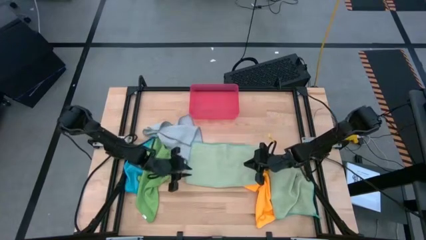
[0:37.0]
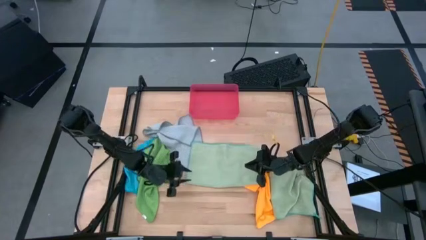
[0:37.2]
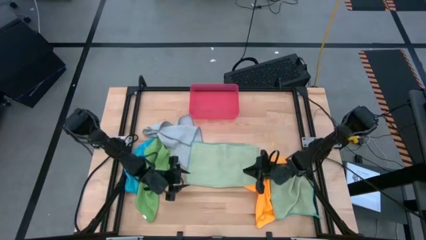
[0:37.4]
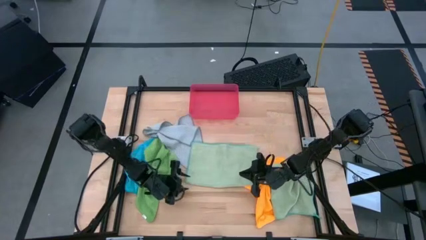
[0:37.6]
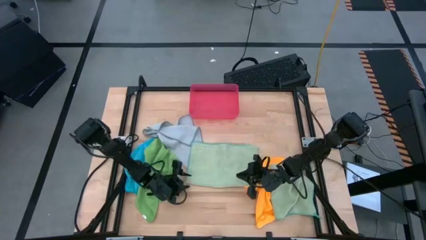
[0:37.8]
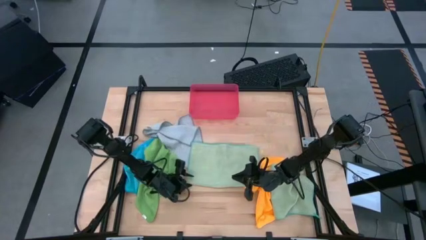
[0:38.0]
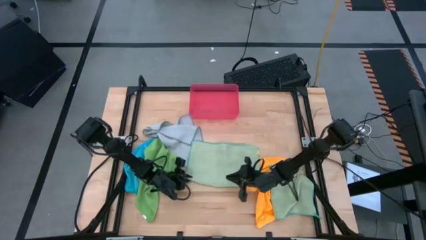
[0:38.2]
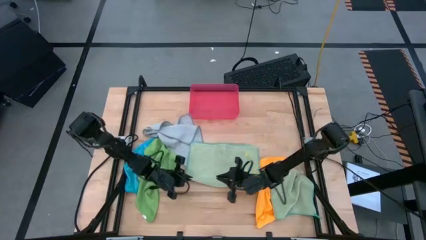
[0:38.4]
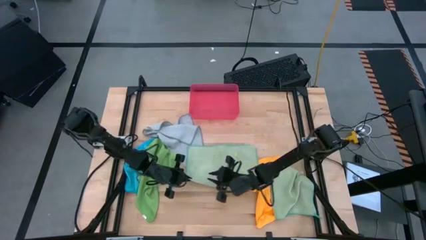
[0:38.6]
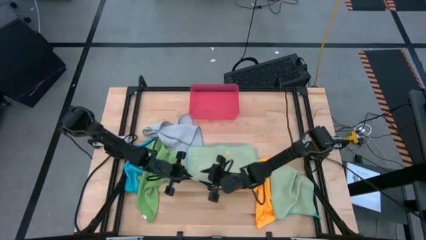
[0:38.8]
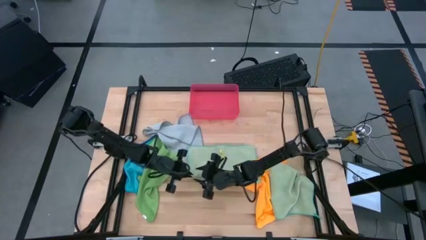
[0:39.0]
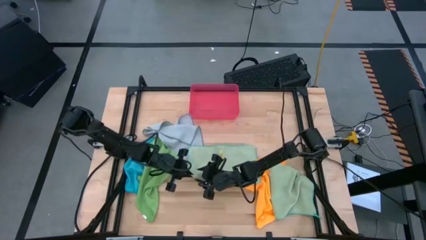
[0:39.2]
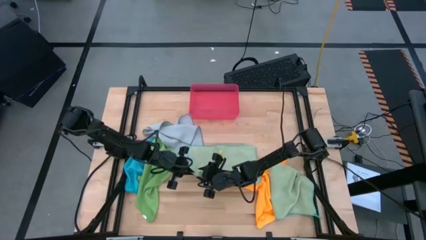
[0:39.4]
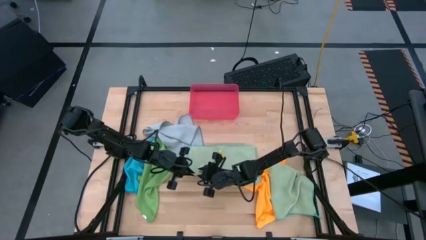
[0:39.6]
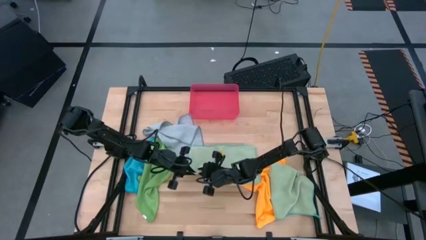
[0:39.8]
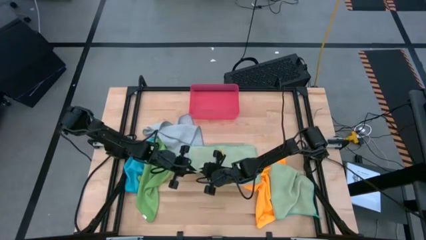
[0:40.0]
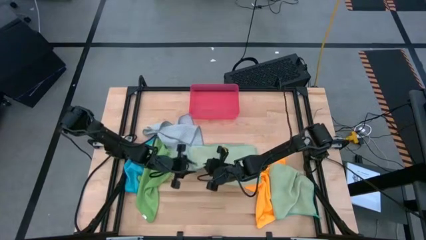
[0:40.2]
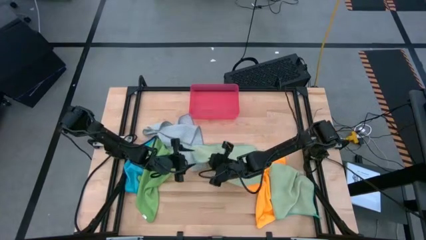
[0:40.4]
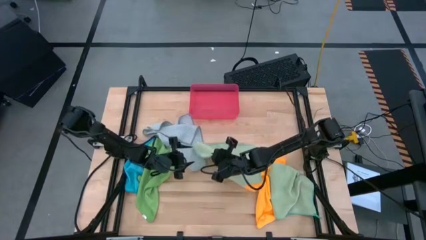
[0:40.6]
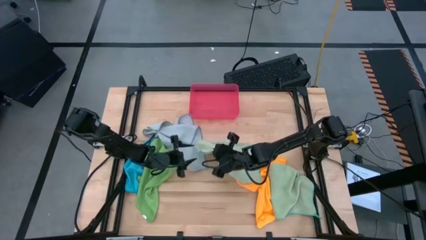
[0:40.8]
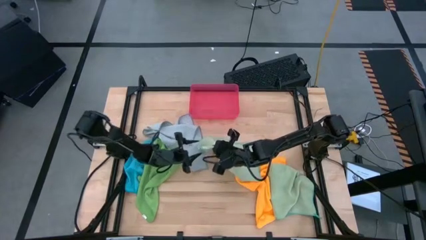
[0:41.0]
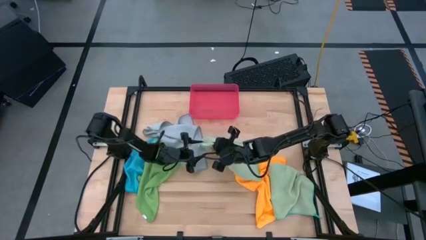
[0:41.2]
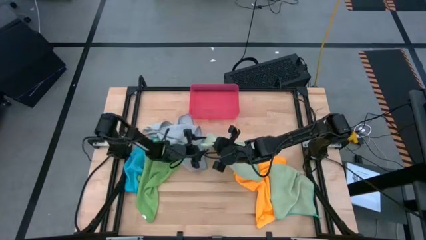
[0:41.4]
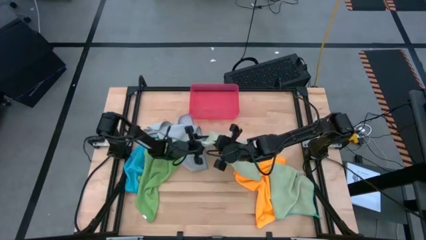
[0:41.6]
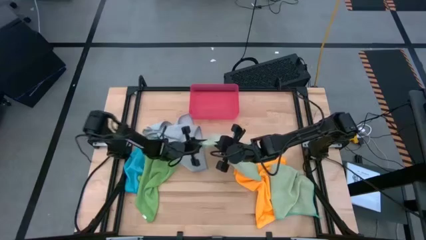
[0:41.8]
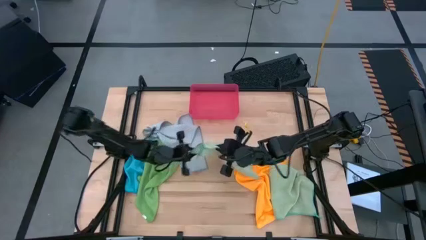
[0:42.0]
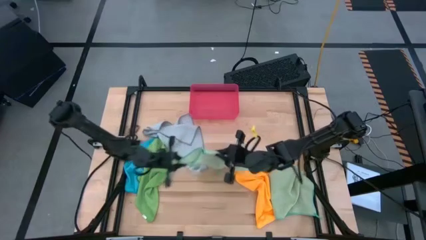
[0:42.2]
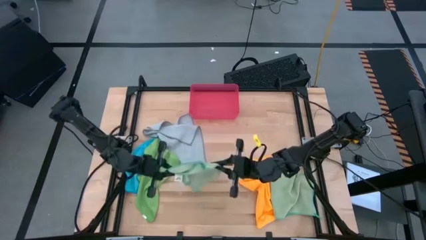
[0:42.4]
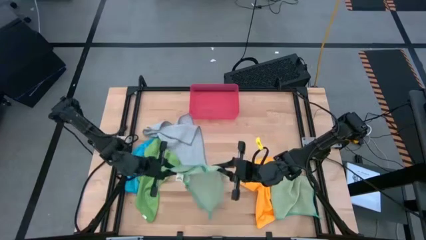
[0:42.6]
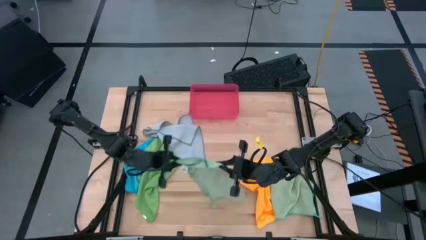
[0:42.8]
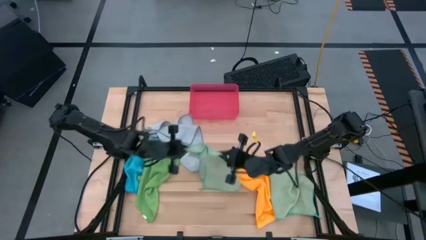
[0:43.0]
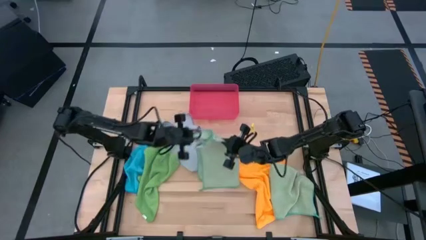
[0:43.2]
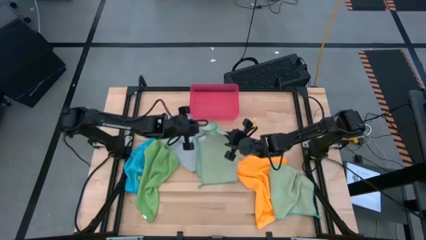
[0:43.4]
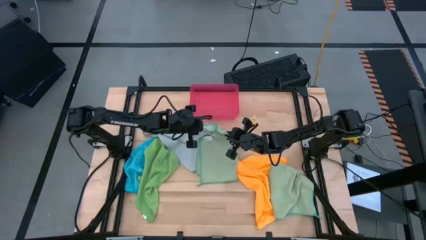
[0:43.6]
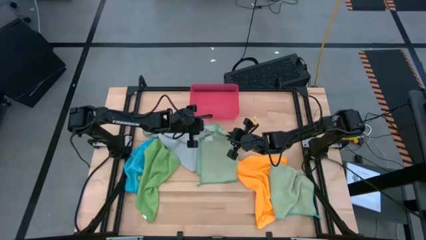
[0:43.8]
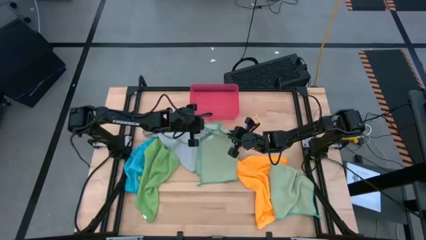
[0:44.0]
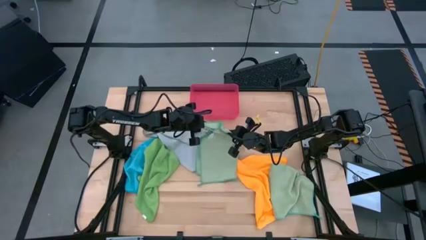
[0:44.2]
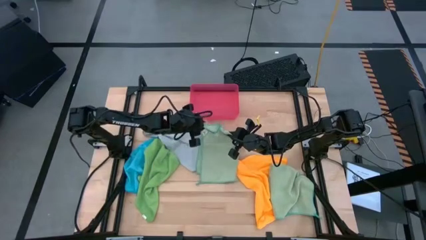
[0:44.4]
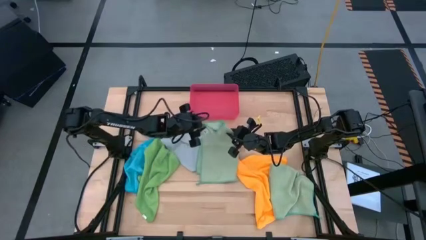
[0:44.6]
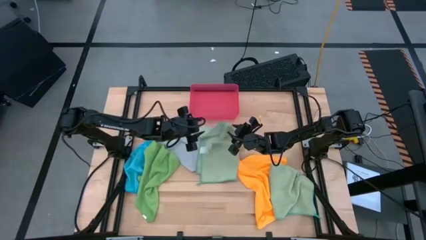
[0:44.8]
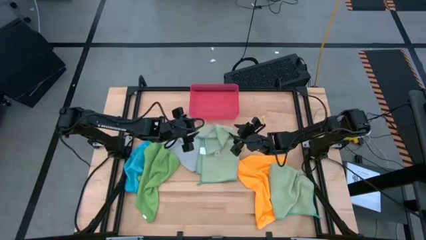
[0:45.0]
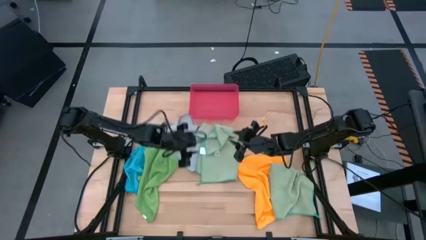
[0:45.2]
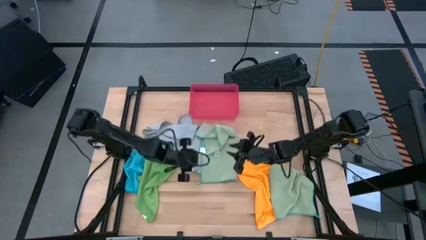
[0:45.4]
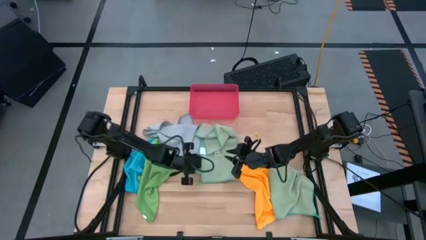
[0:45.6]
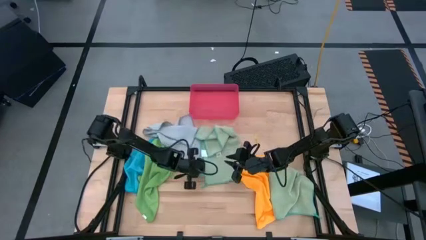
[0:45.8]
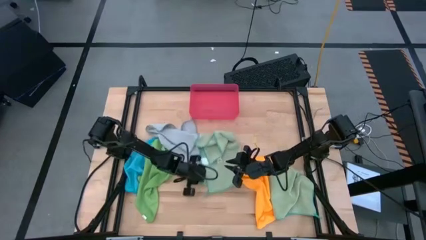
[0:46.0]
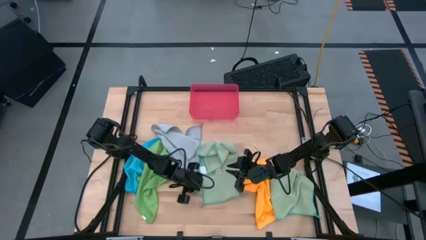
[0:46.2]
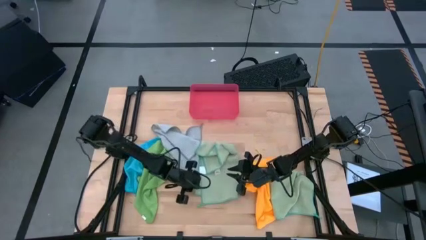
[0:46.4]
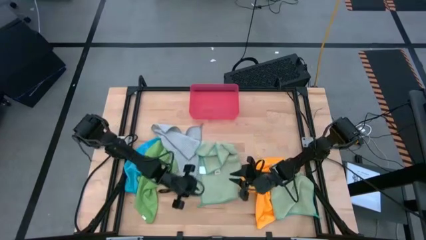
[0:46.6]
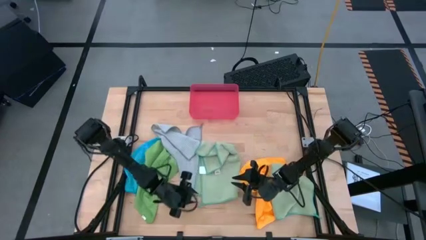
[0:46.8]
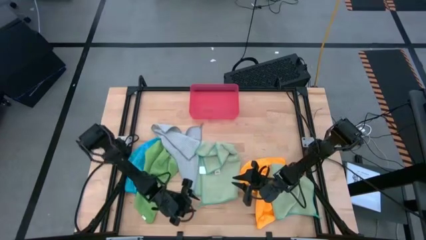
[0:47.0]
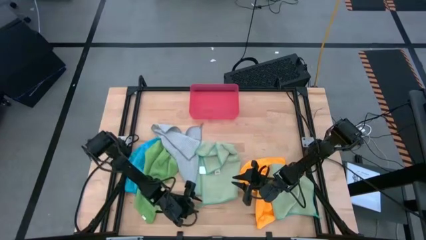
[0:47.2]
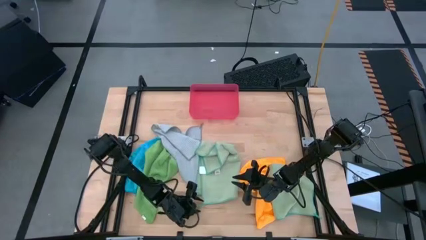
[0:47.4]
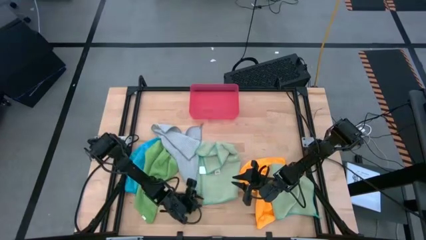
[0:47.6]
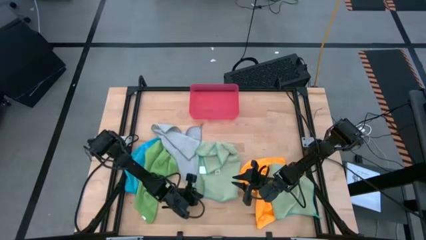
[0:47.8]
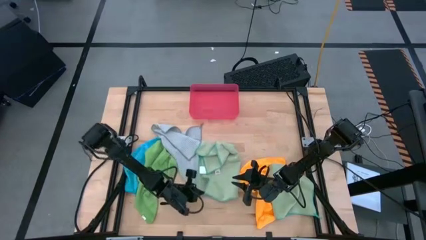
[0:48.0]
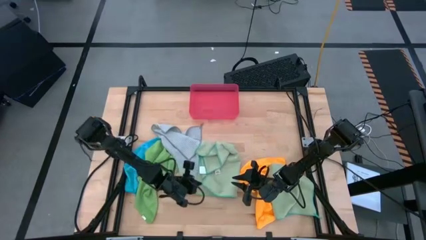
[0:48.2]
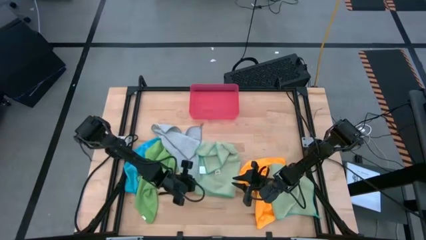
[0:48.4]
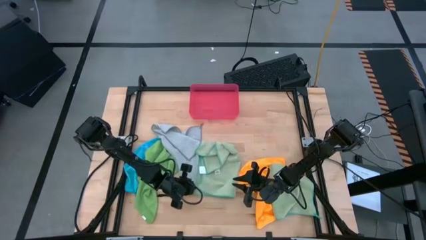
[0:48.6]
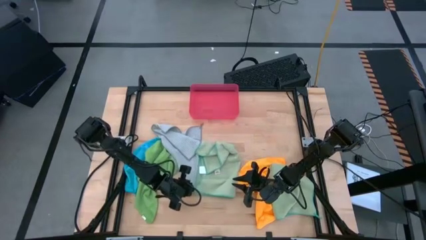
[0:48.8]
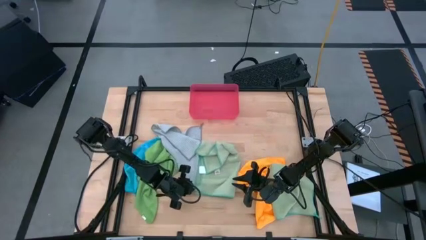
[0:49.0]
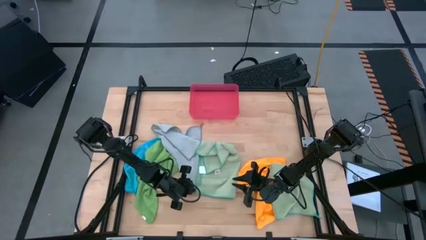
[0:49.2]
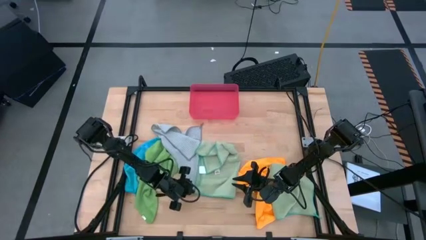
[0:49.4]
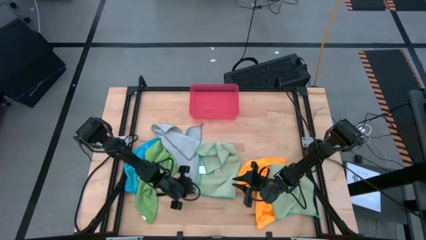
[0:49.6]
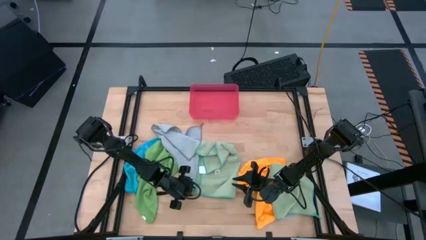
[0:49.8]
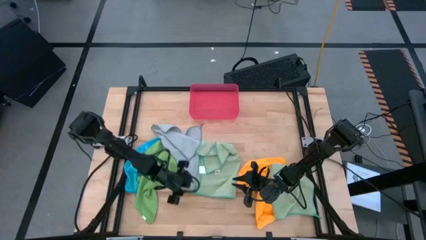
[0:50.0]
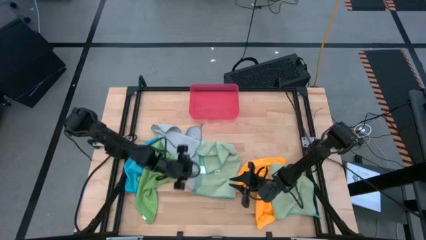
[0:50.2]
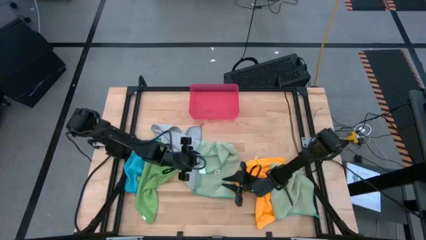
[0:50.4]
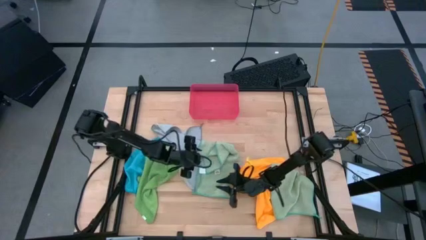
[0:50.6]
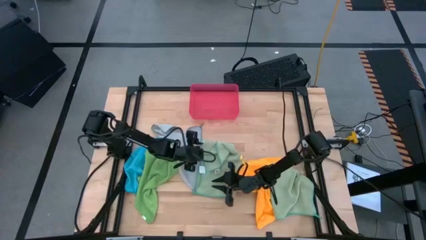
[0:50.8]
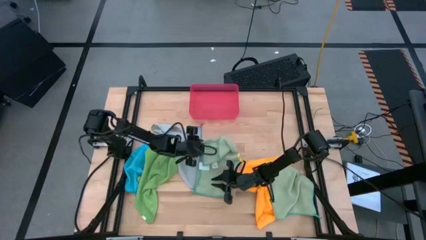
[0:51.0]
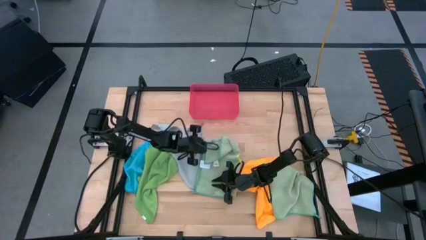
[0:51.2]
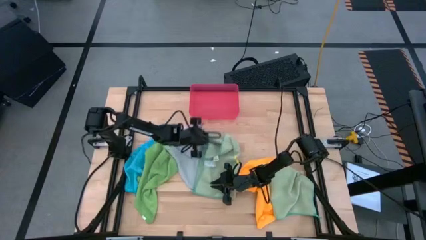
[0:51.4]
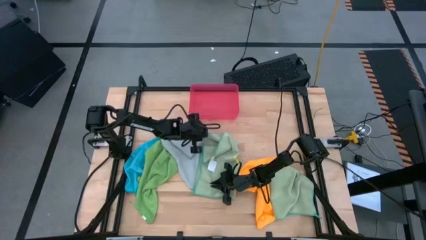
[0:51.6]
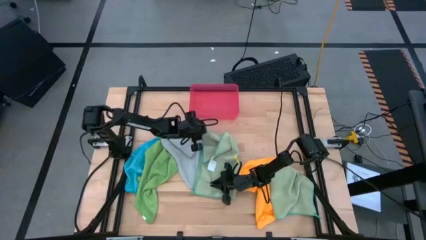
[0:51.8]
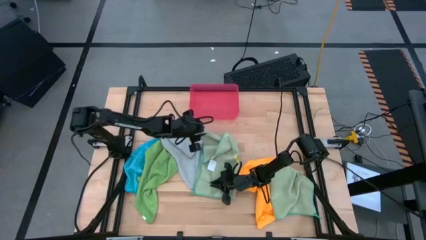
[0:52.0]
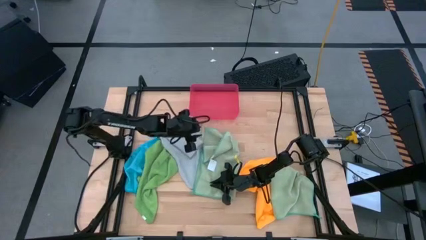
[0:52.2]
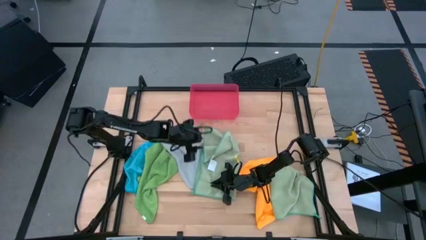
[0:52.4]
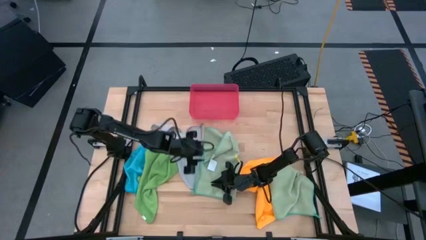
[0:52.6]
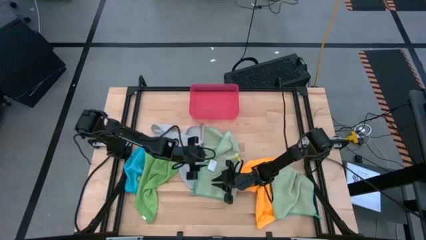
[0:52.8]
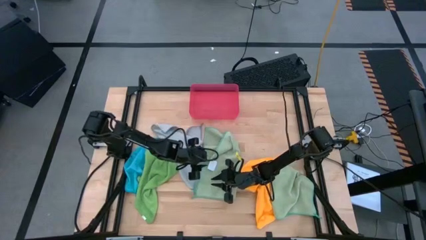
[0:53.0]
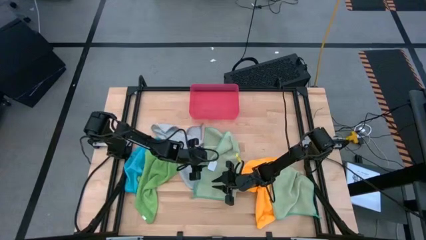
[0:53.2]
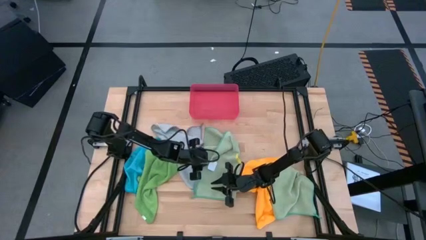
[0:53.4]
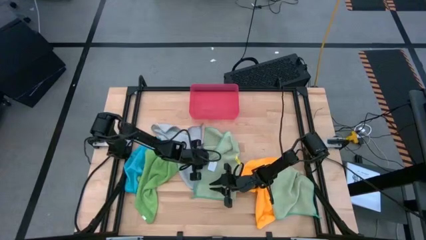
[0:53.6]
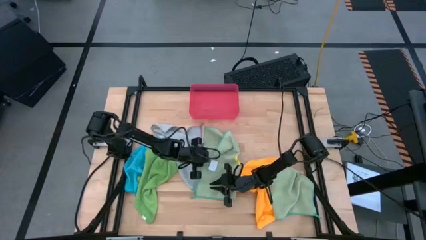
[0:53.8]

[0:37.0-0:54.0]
Task: Fold microfiber towels
Fold the top light green towel
